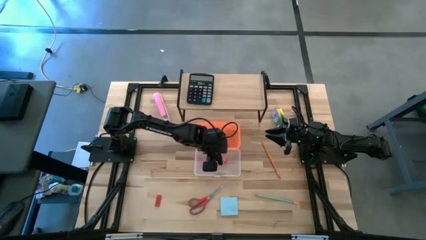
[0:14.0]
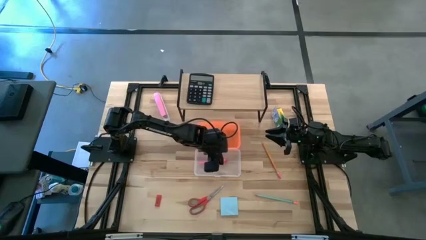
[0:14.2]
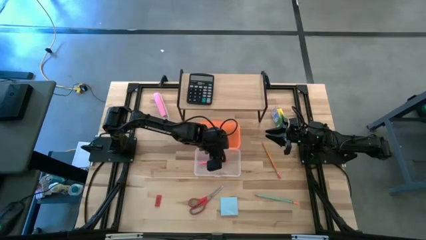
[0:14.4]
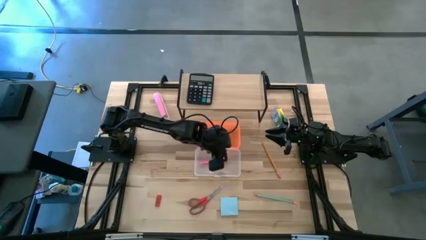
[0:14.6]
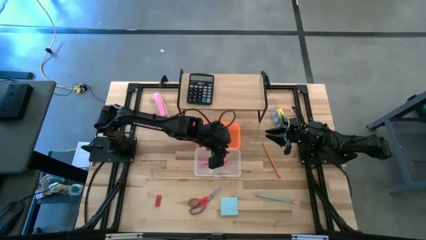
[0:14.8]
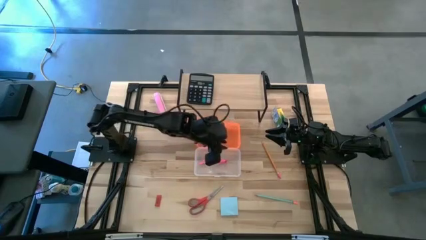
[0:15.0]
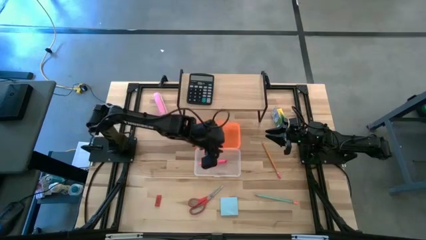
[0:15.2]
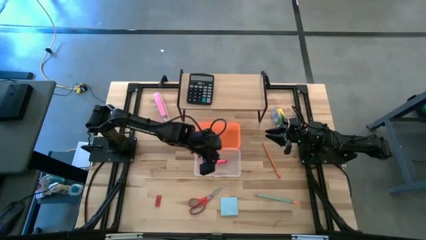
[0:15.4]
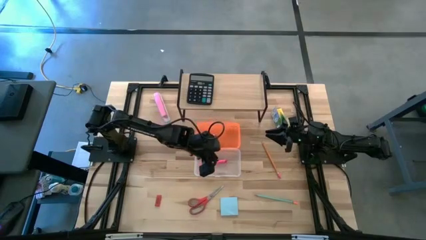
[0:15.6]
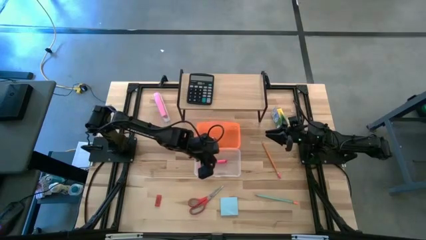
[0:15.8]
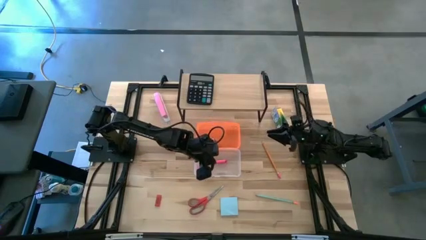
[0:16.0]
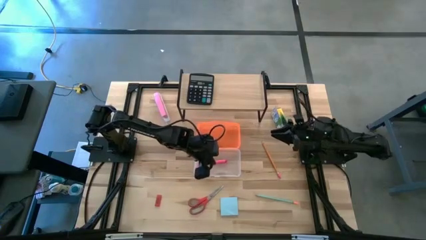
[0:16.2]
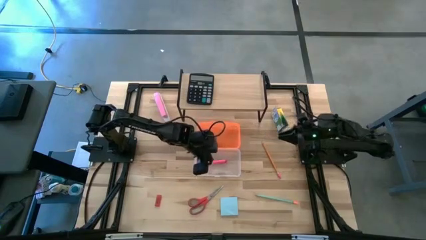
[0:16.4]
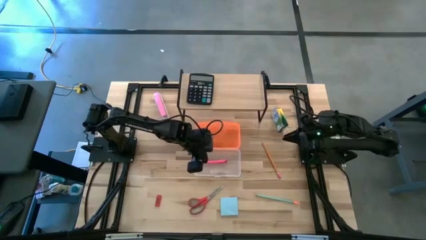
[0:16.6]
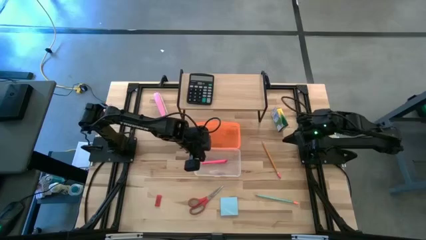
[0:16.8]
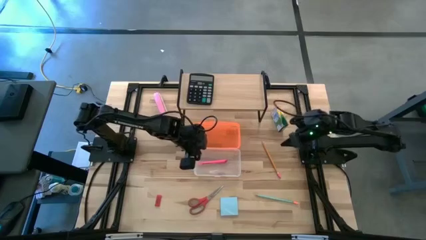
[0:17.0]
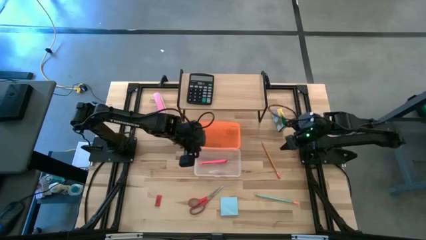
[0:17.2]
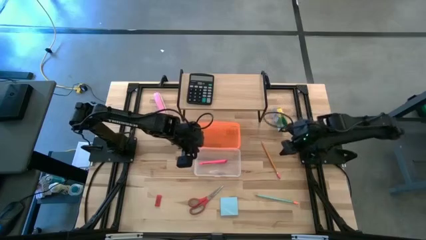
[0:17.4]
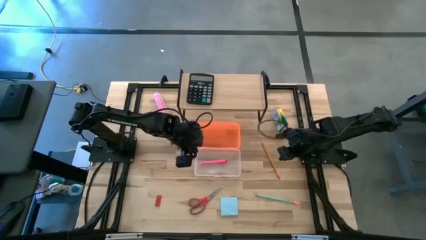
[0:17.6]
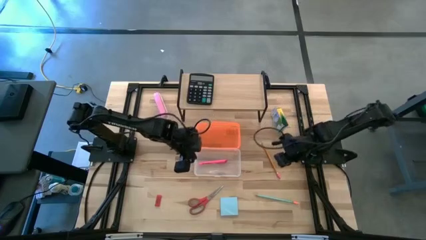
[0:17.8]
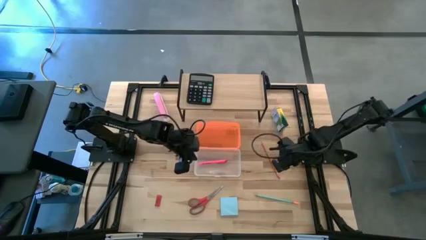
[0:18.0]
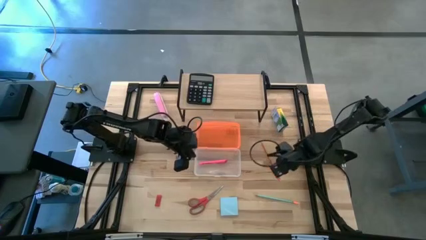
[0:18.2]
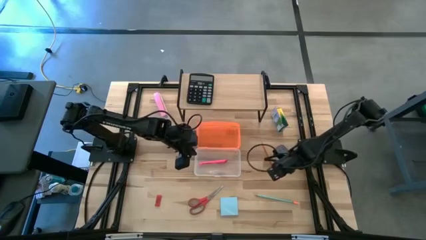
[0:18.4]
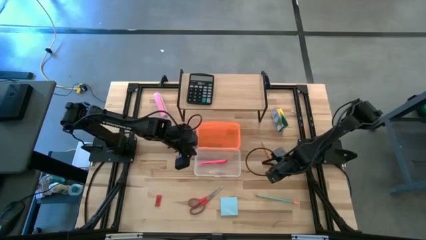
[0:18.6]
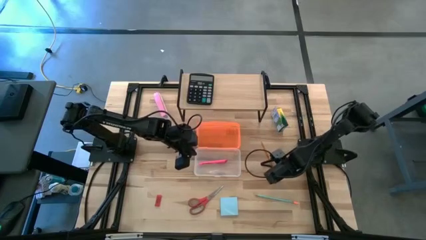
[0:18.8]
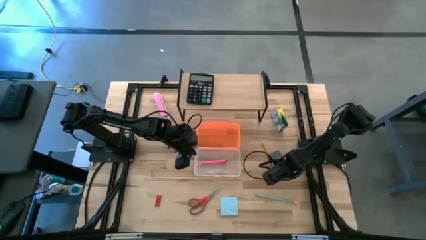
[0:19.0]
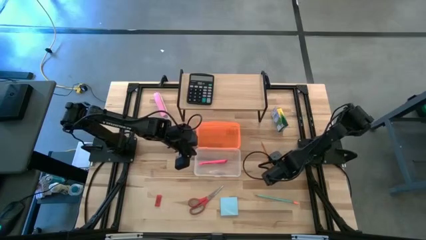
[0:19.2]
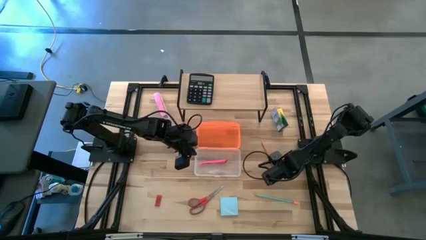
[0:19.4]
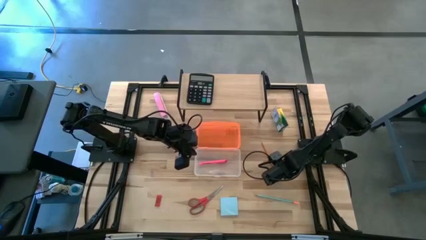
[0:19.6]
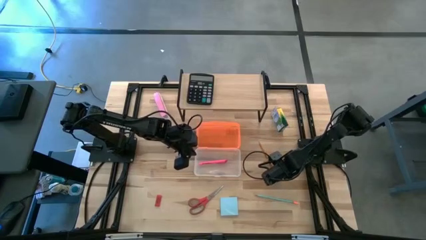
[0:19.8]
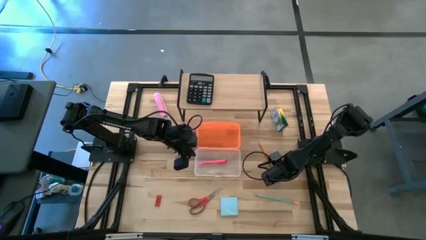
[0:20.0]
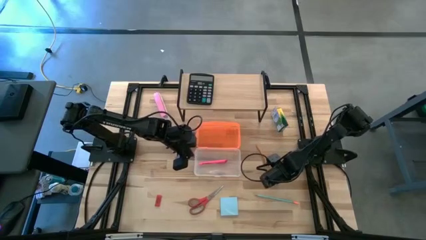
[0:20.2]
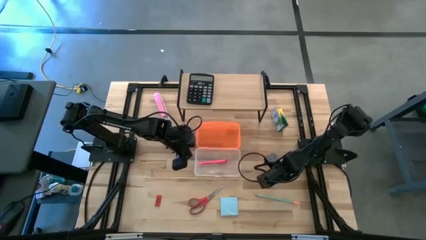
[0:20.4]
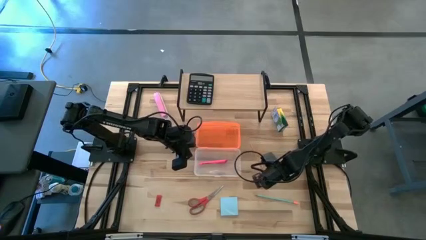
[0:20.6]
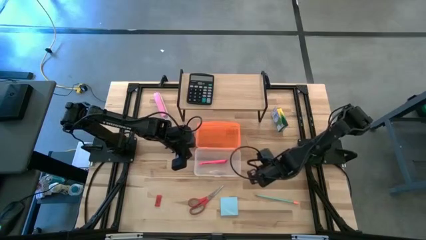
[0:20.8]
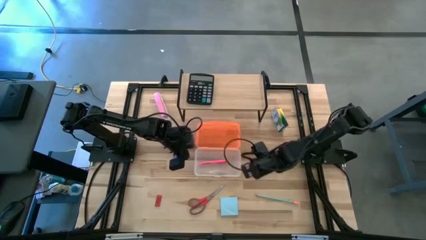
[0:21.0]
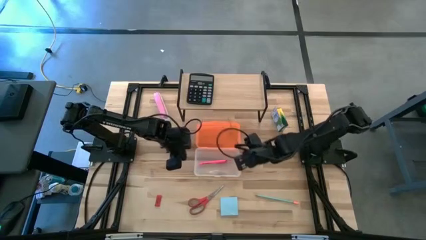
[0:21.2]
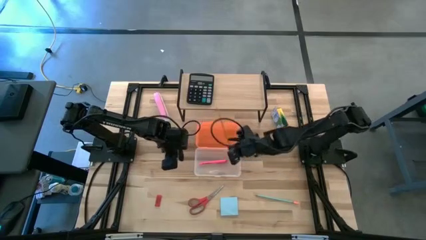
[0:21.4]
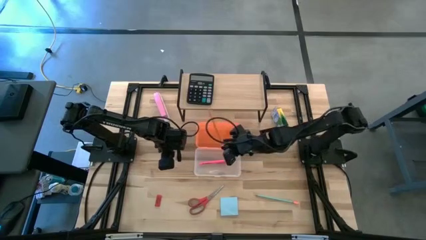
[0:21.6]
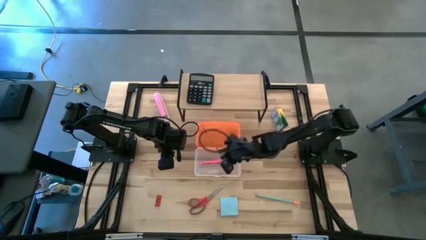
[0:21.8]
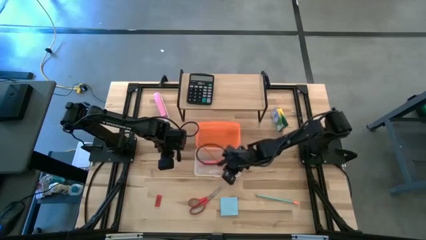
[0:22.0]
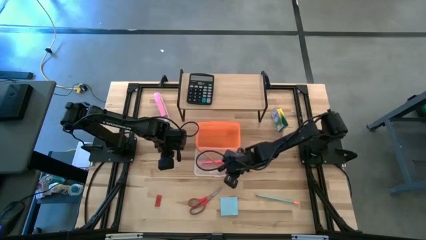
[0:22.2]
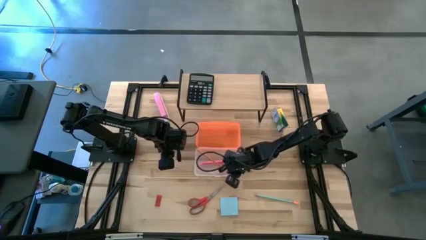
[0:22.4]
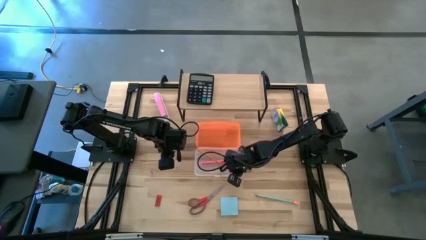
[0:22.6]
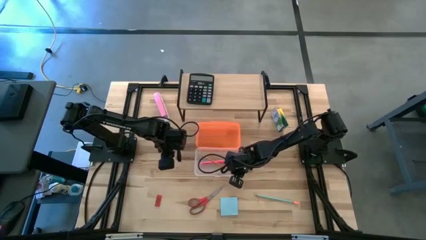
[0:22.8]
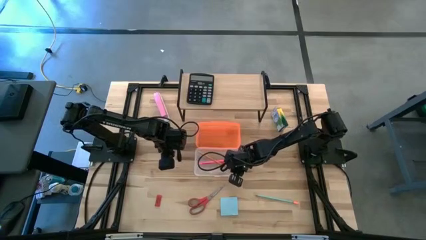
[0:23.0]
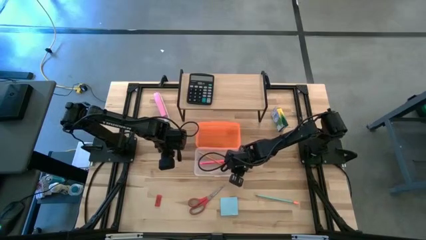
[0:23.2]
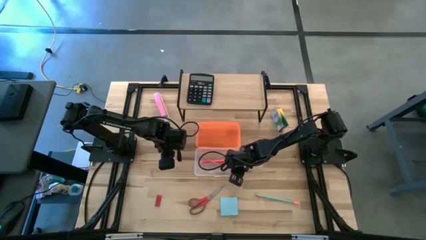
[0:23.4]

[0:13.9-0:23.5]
Task: Pack school essentials
Put the orange pencil into the supply box

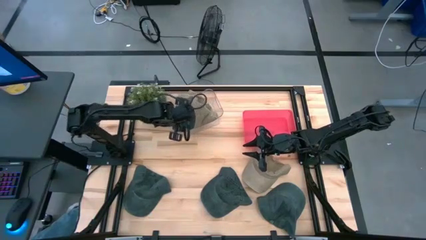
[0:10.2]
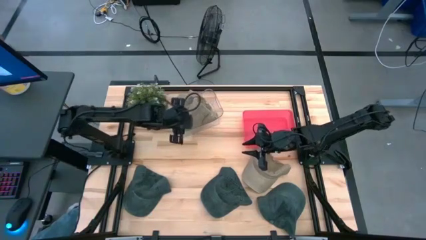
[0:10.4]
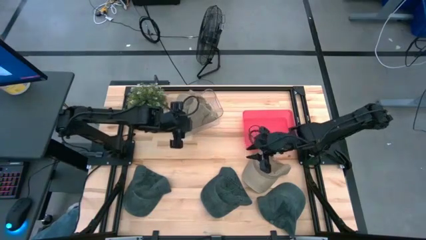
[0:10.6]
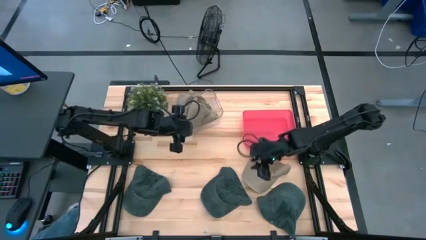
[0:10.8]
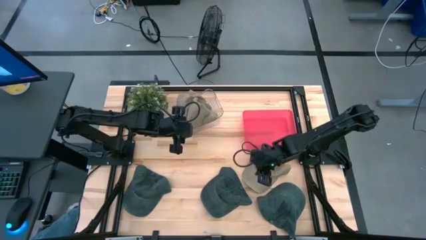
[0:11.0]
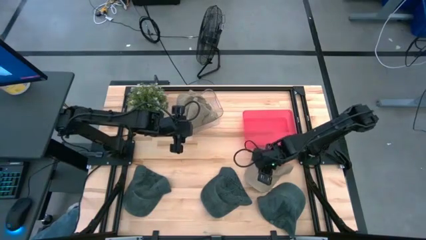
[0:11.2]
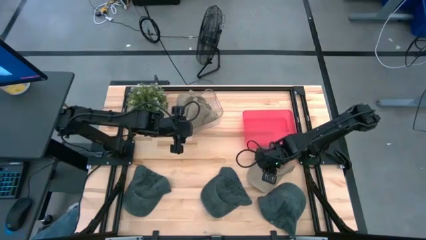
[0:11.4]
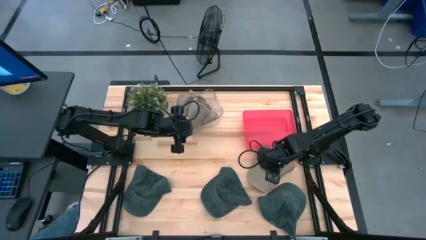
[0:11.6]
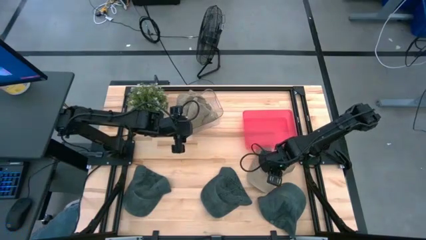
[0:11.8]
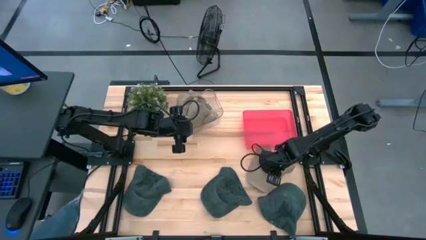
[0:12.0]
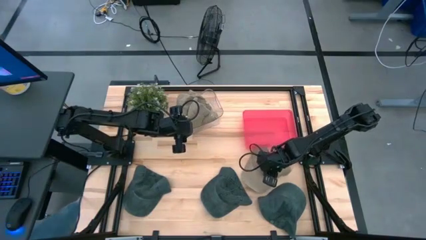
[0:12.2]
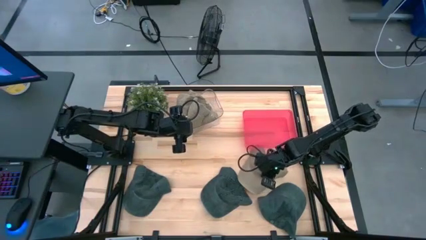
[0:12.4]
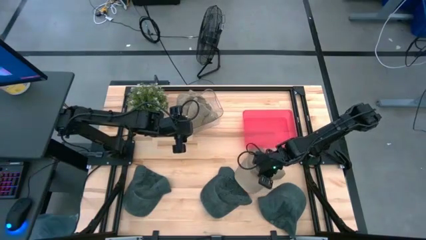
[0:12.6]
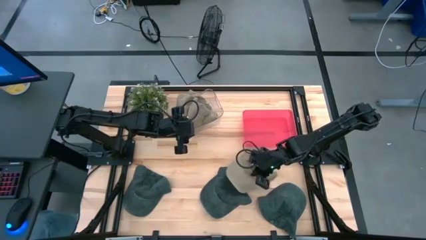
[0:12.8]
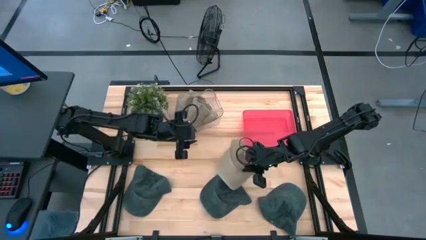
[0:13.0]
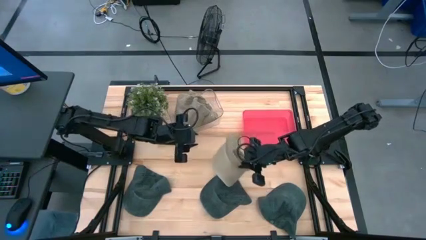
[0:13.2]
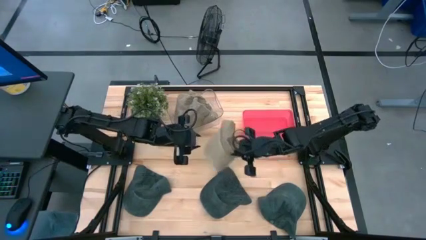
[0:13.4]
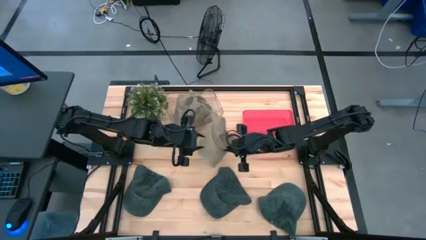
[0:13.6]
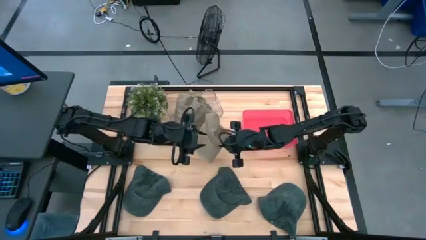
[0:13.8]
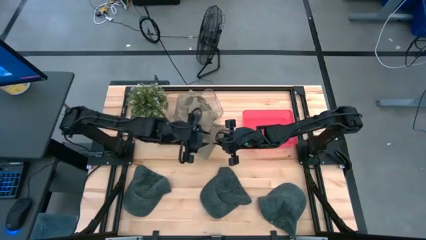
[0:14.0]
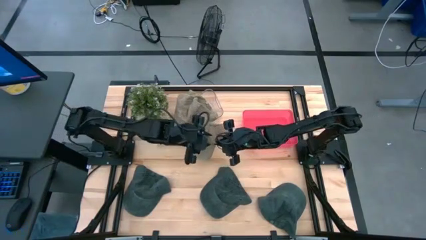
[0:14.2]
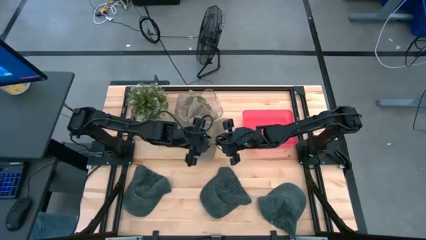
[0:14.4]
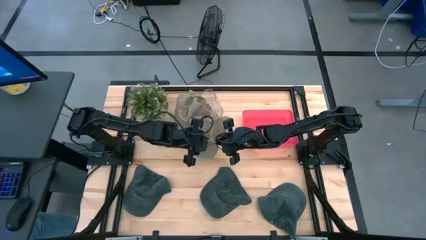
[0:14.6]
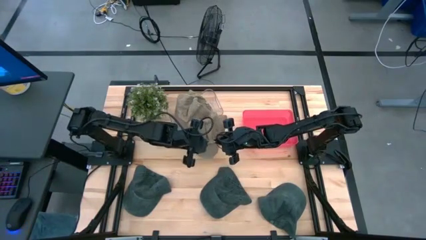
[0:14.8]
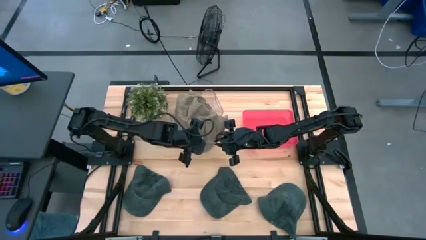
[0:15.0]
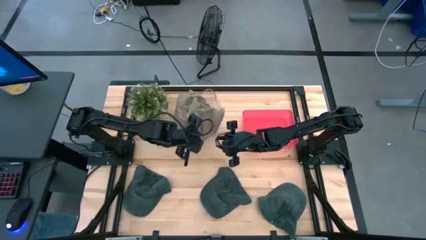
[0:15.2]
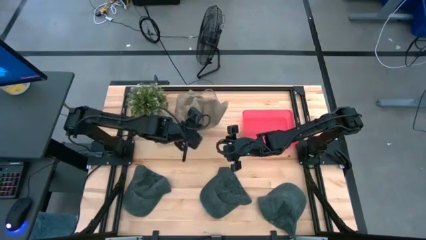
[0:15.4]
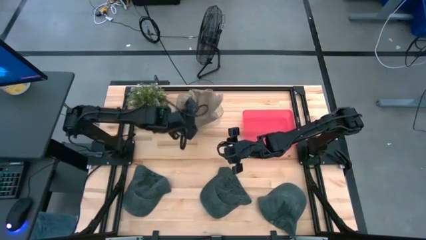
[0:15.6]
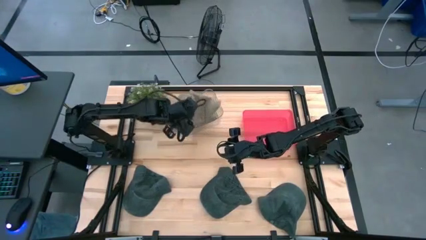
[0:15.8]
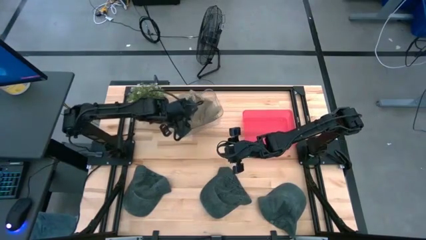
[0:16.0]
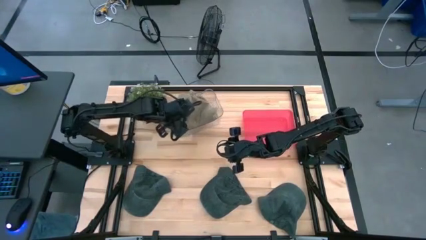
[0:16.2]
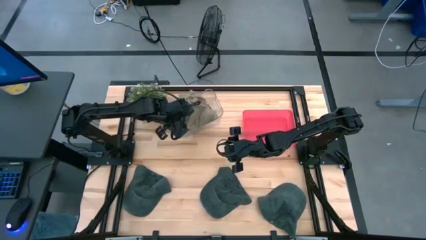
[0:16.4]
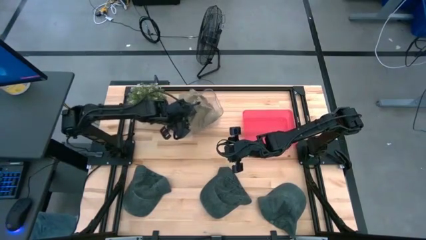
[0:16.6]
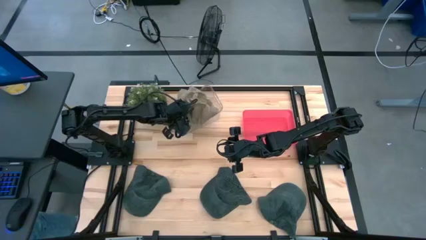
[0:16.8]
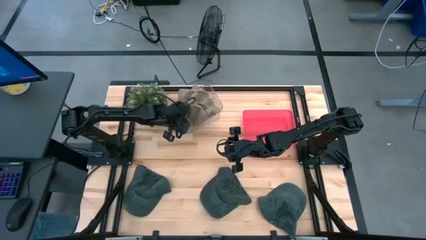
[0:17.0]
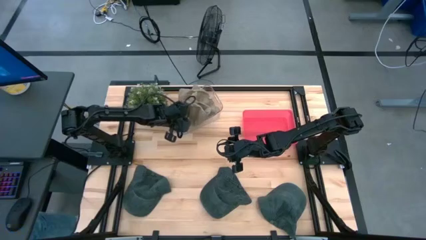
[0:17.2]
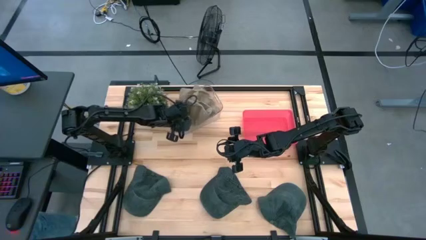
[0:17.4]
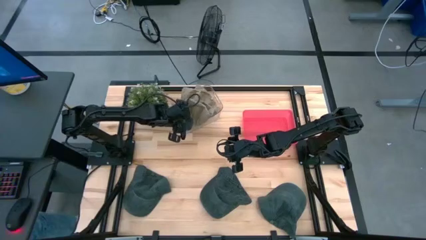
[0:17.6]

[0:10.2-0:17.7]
Task: Pick & Place hat
Put the brown cap into the transparent bin
